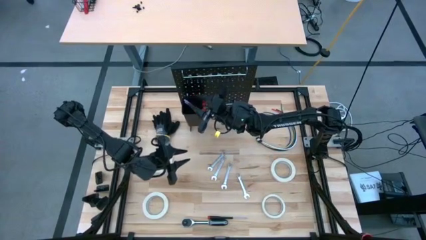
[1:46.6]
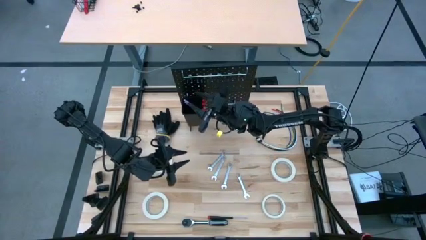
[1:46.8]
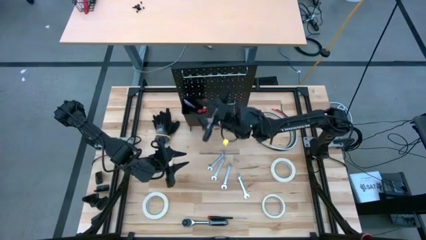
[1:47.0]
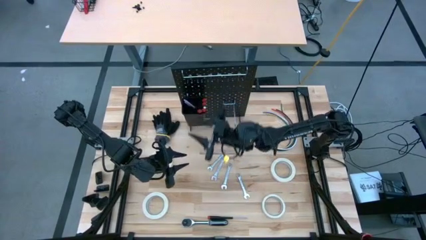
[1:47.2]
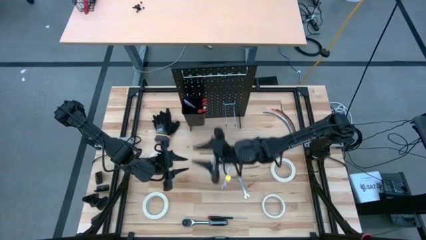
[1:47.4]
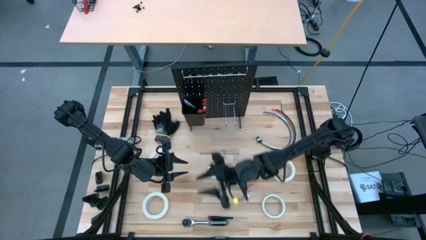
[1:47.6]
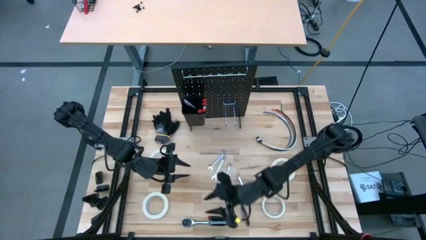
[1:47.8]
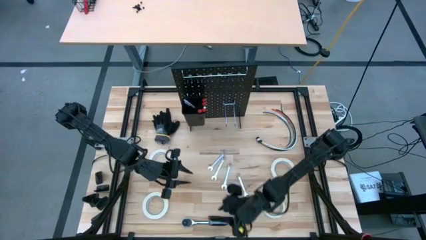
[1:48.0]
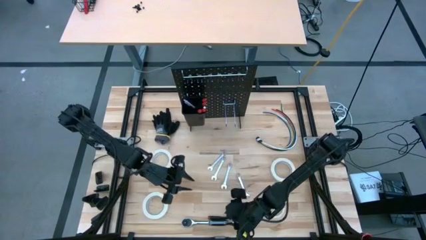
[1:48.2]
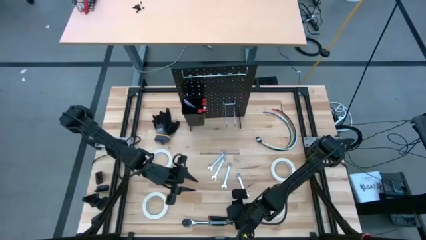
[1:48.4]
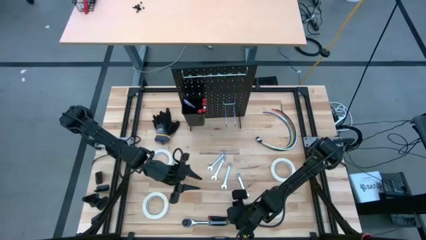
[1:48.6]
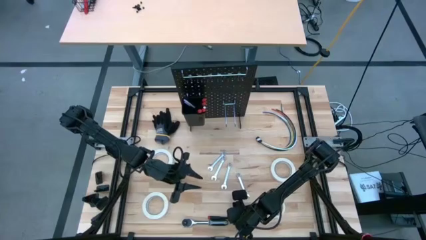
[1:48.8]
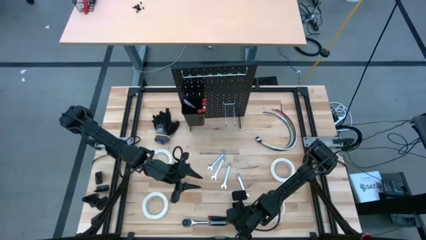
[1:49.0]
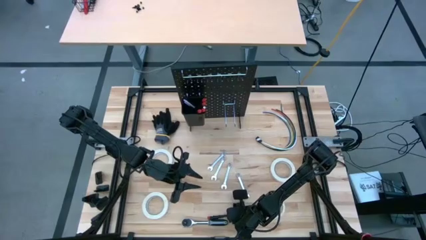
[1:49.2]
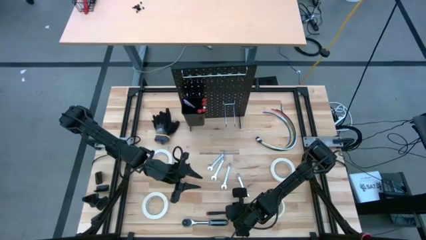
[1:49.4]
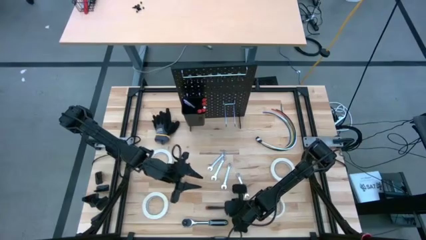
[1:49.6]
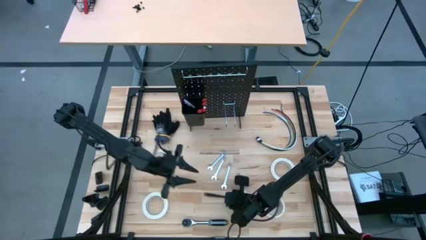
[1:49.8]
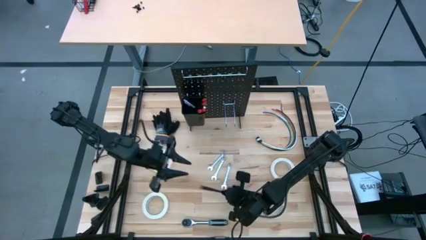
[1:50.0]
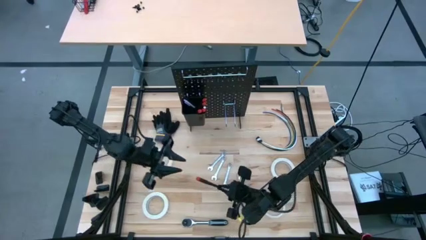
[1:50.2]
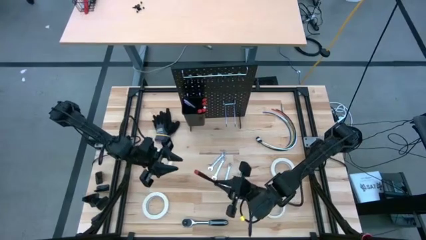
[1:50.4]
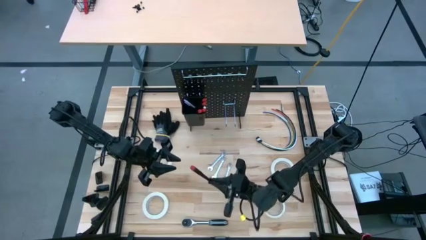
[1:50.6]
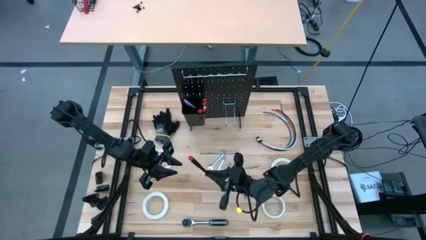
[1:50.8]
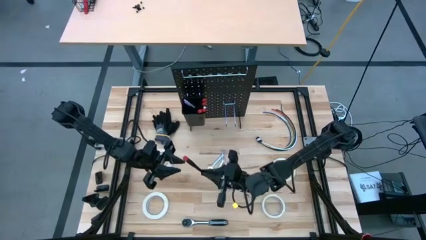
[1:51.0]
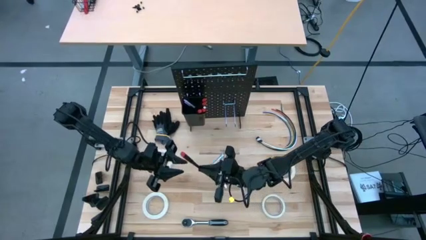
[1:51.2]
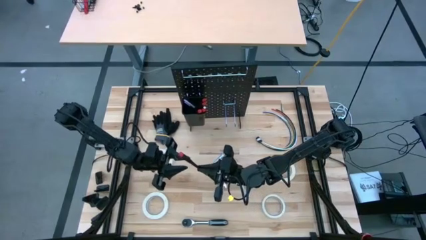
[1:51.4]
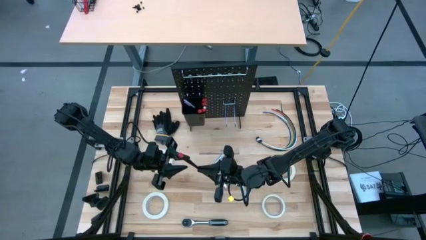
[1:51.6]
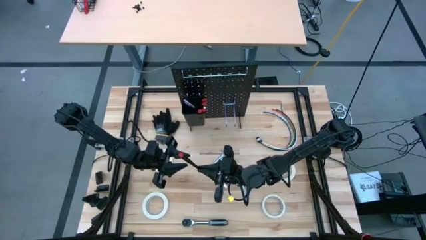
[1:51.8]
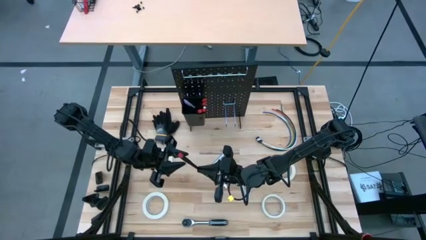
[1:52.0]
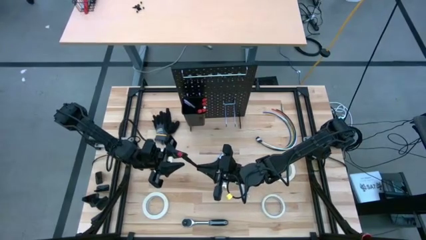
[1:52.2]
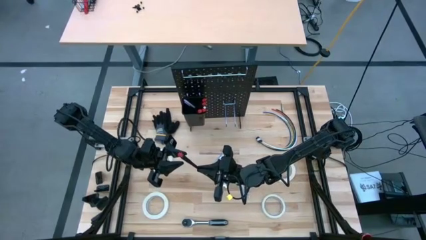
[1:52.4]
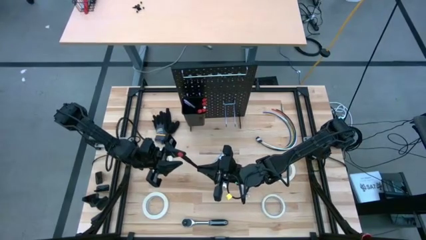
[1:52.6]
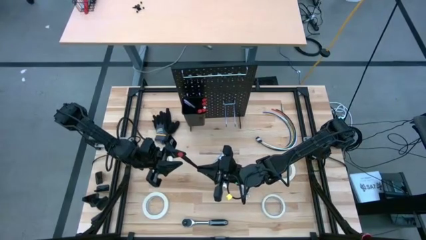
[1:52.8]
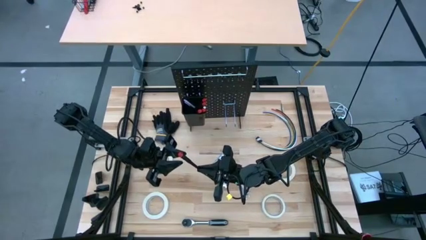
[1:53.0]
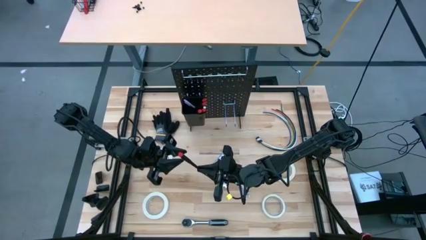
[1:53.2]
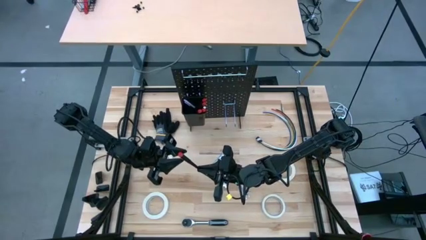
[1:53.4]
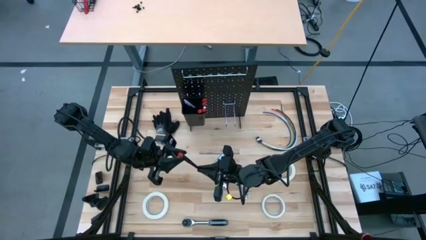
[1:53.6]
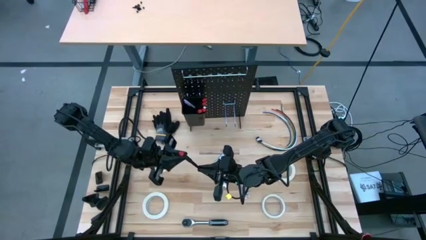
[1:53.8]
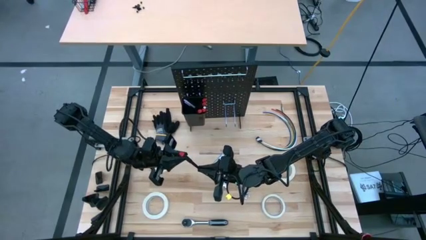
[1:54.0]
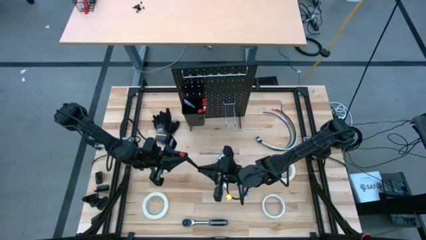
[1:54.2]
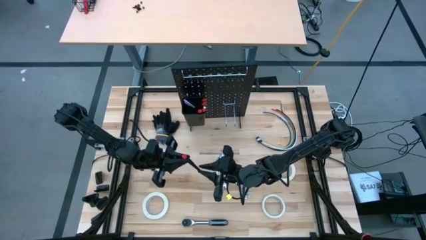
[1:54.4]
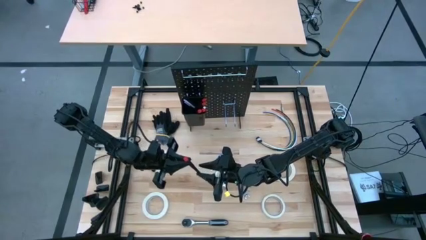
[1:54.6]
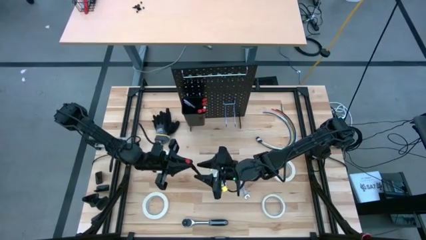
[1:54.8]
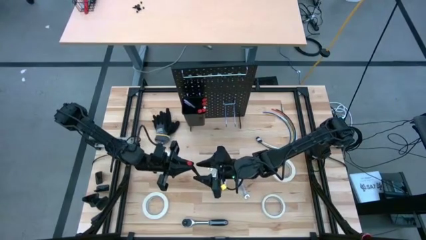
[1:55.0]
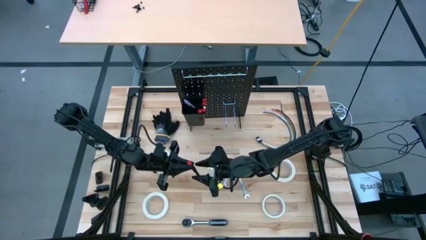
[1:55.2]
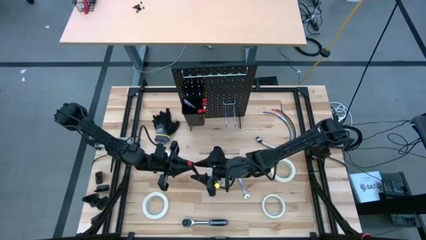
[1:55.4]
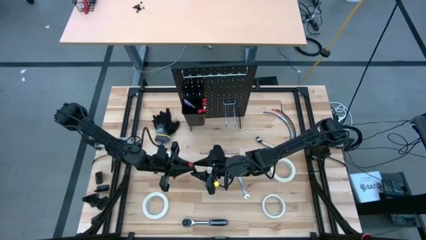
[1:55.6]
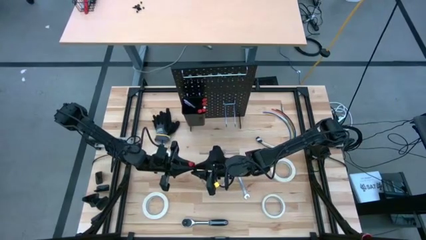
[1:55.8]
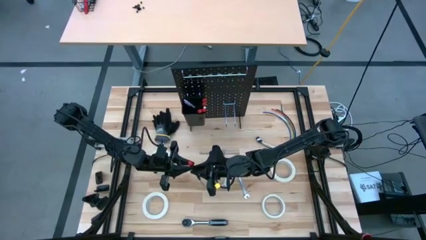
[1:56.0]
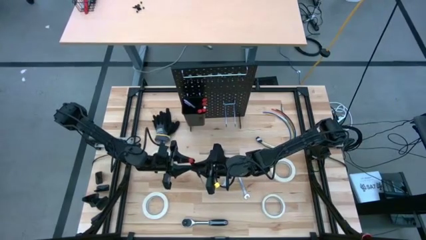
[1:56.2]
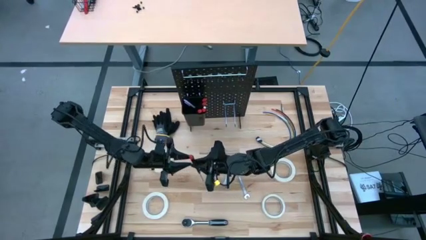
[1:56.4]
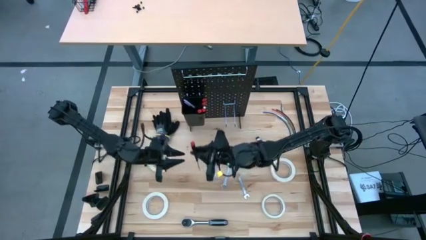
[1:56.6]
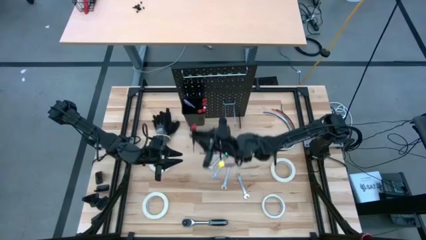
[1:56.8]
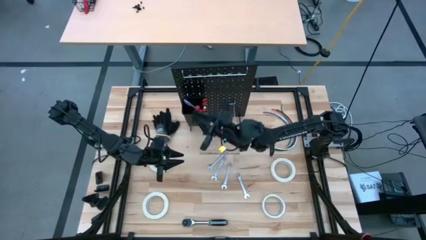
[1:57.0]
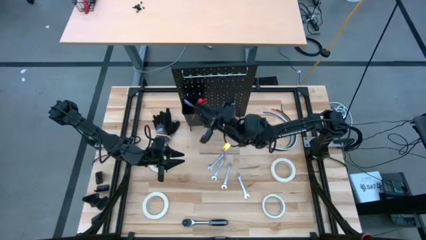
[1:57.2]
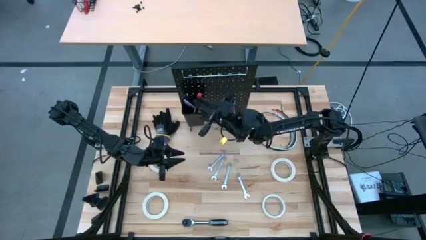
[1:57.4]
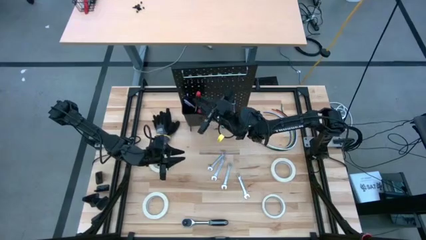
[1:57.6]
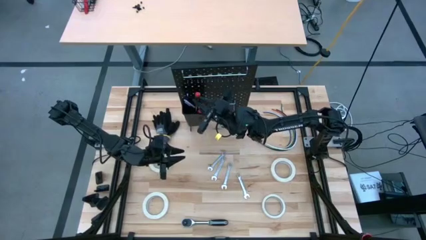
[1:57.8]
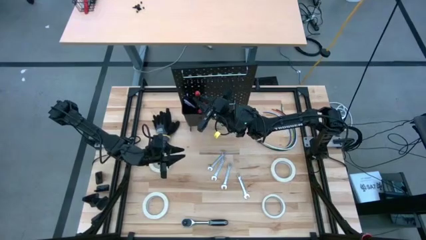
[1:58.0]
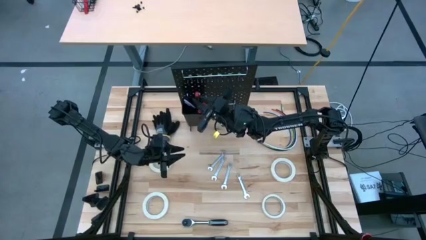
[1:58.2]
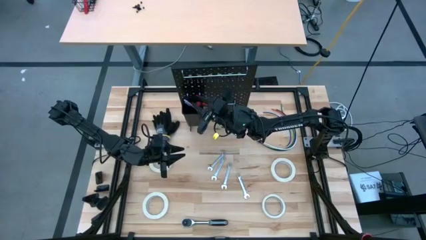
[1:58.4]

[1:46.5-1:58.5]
Task: Hang tools onto peg board
Put the nut driver into the black bin on the peg board
